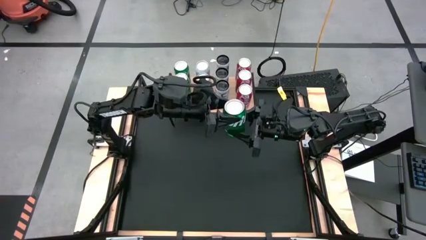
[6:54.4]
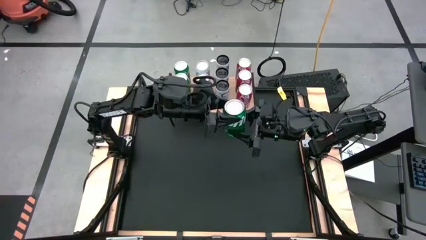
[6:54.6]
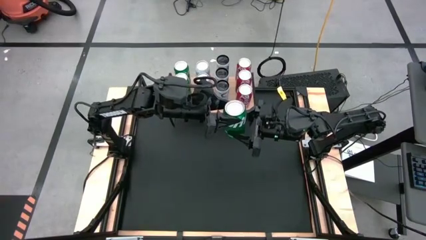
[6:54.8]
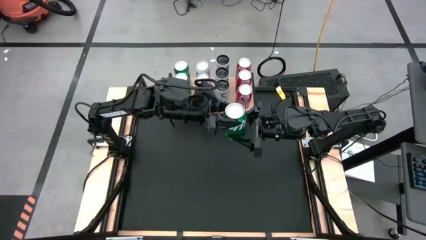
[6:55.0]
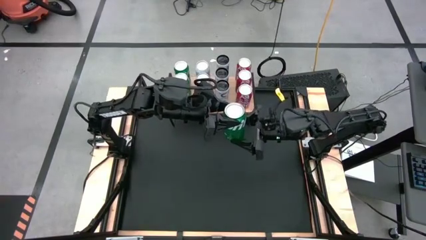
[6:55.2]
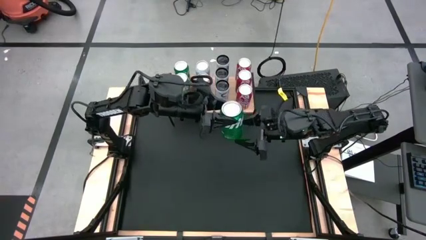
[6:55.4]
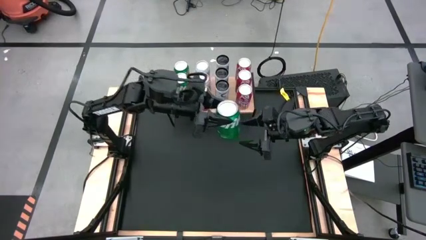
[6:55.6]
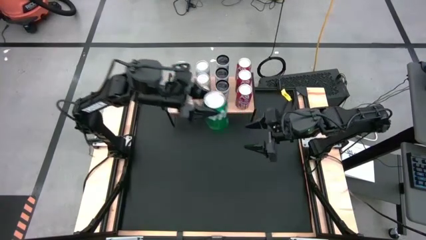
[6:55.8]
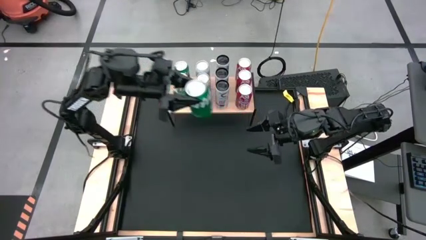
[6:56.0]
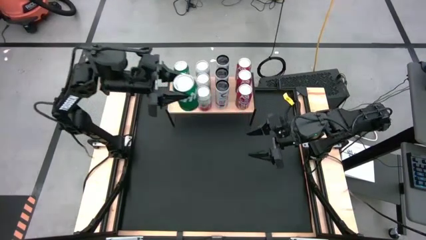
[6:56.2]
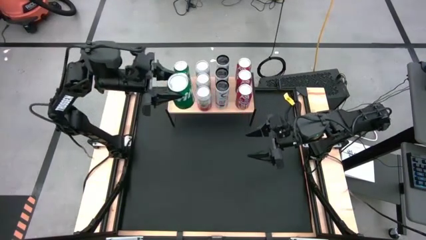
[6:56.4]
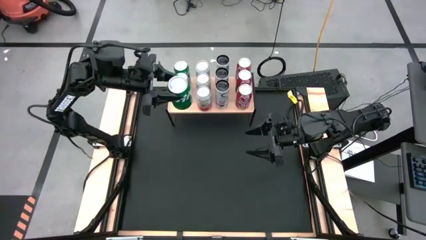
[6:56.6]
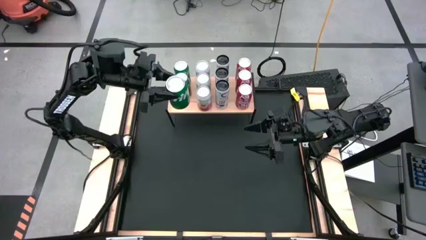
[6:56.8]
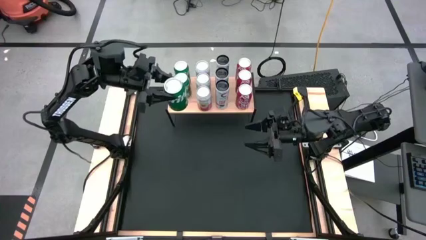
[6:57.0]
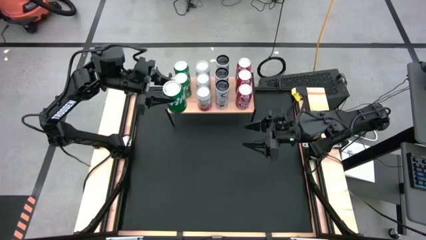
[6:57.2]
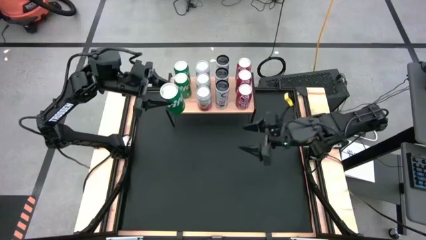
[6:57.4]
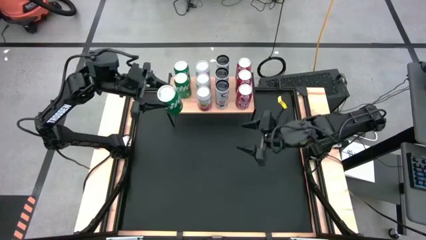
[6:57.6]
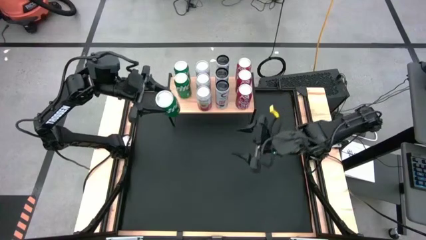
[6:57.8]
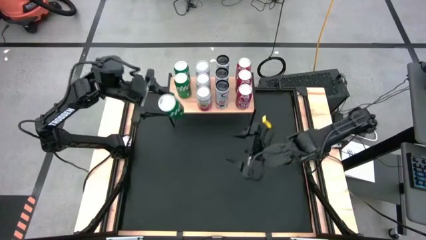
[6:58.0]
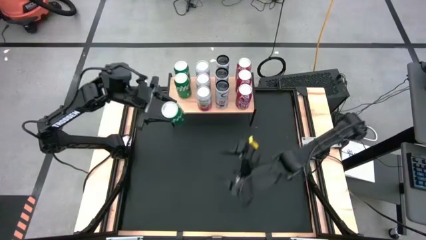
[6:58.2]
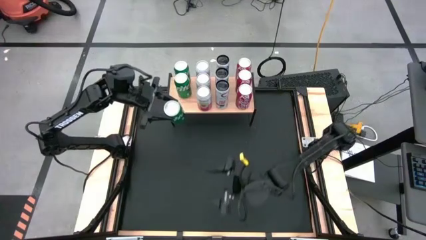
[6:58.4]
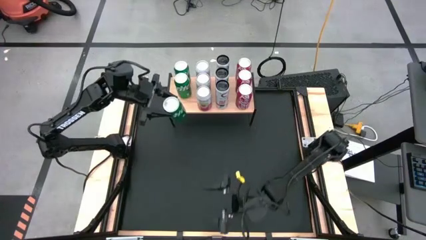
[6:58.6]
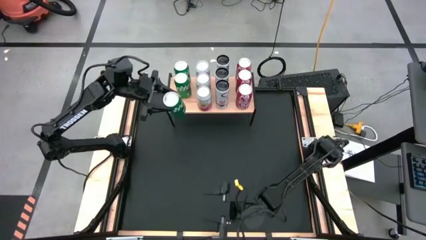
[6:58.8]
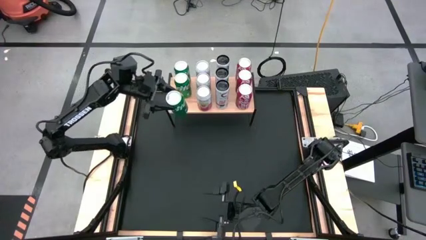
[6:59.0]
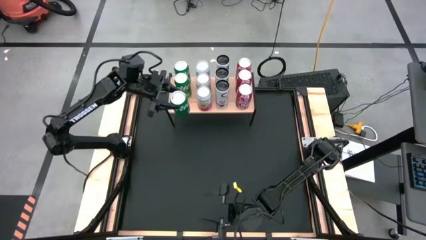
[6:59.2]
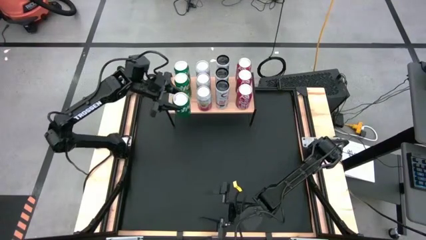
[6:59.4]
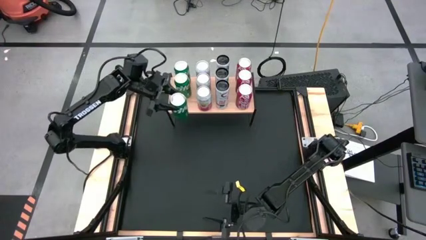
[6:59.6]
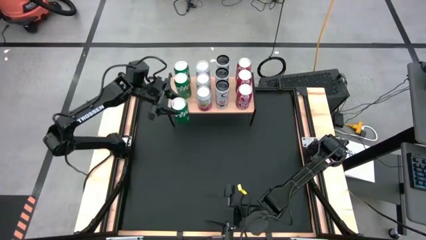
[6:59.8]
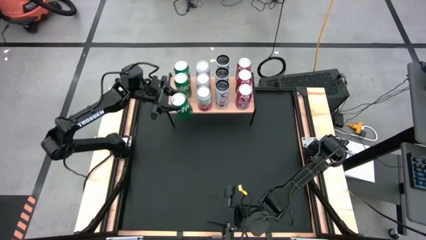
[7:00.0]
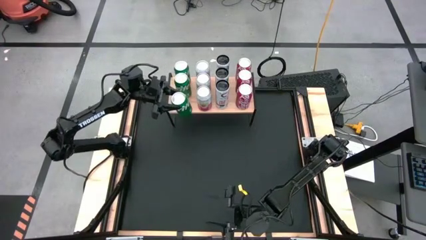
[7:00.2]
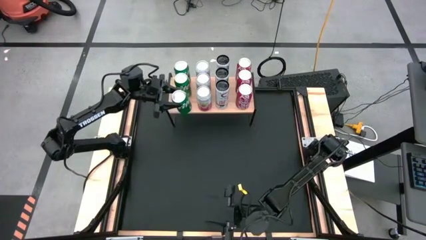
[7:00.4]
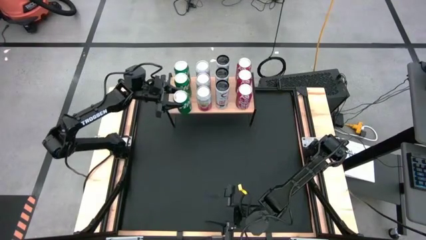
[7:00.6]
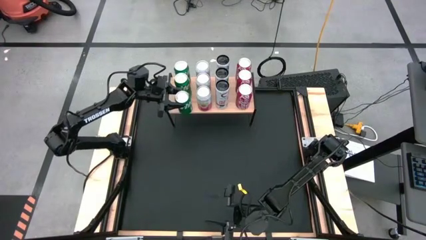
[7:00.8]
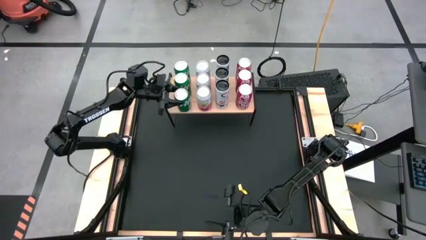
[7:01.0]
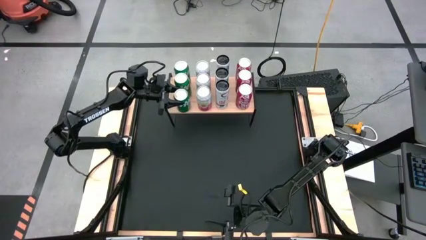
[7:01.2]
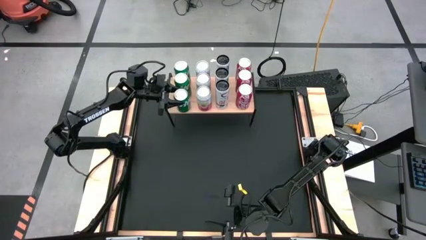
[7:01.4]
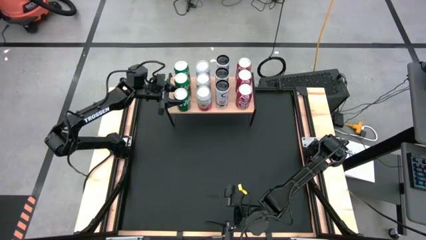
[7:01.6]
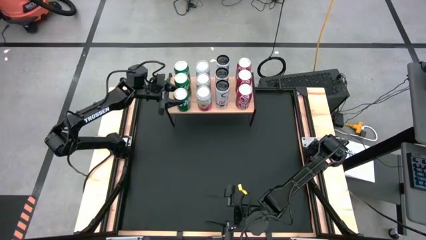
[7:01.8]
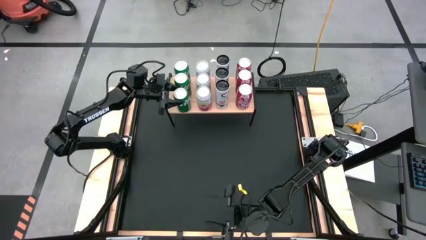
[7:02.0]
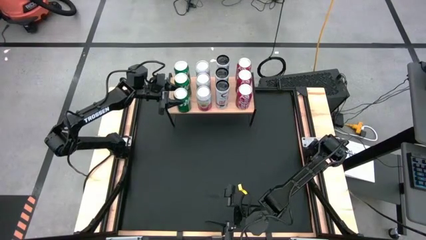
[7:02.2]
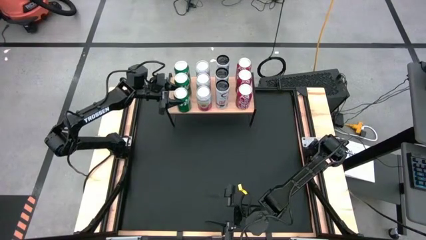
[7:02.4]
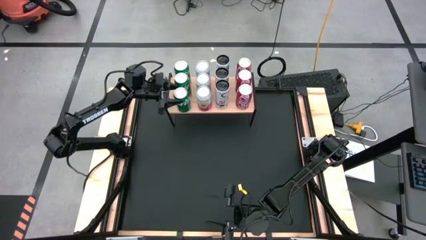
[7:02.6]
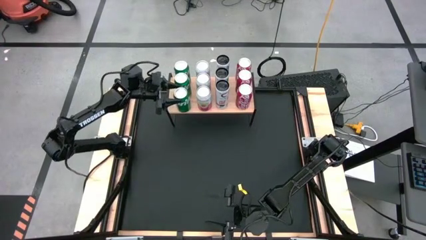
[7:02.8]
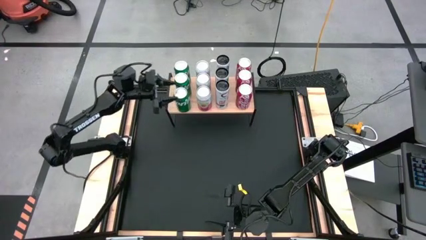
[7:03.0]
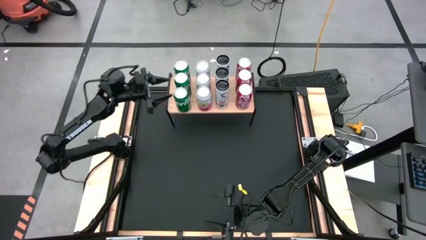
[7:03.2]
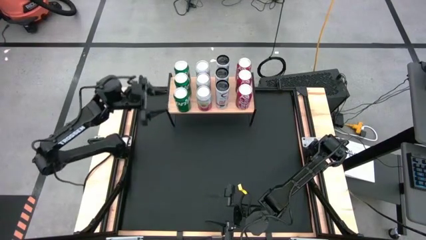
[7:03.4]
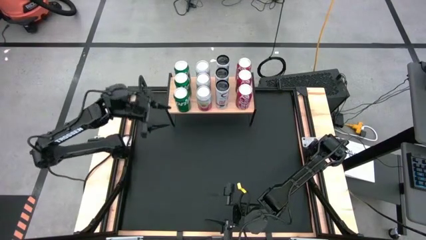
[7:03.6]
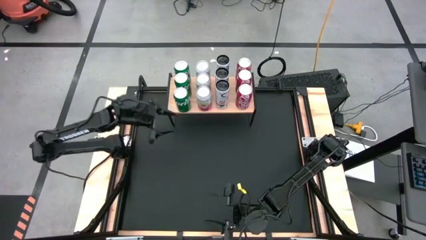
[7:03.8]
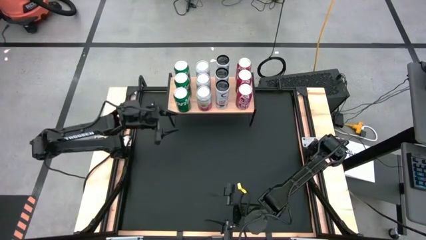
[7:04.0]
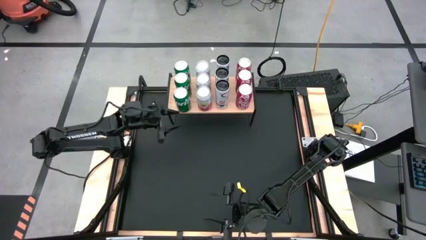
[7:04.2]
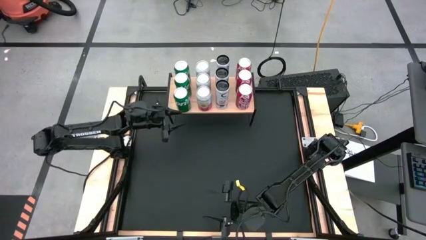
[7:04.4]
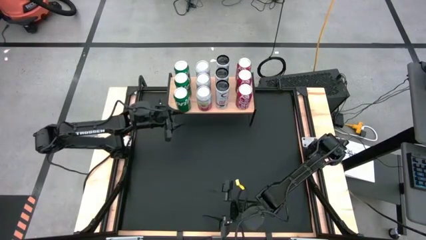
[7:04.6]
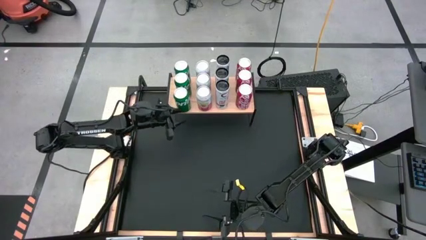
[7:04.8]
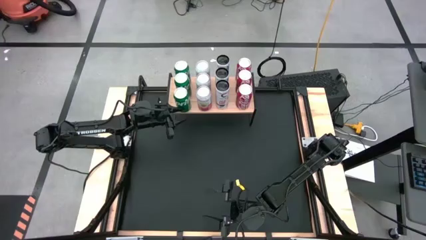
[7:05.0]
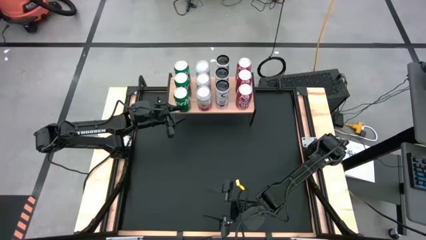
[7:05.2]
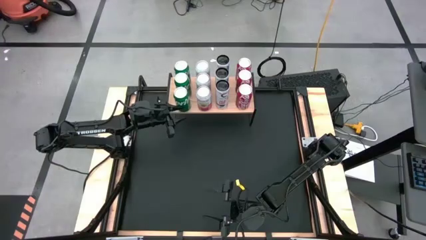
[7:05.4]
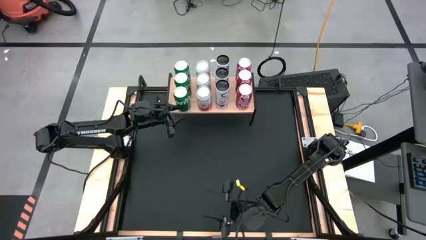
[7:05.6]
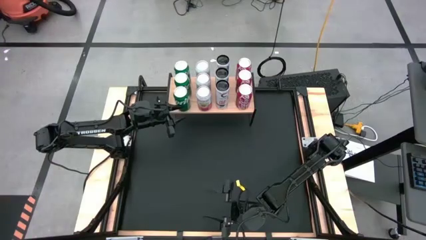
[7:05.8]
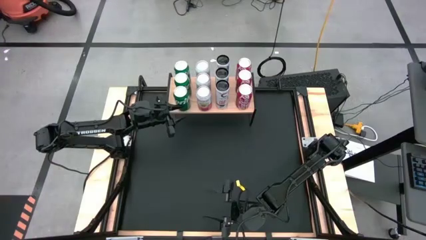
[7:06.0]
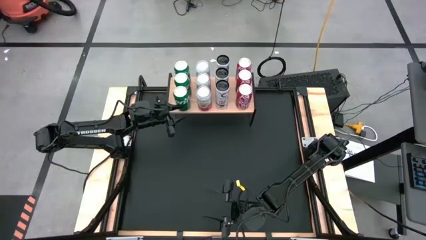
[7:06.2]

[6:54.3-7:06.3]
Task: Place canned beverage on shelf
Put the green soda can aligned with the other green soda cans on the shelf
